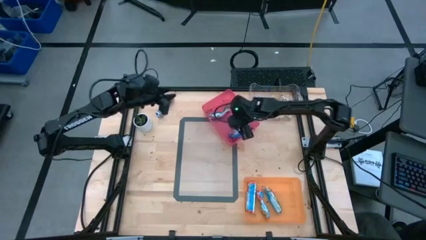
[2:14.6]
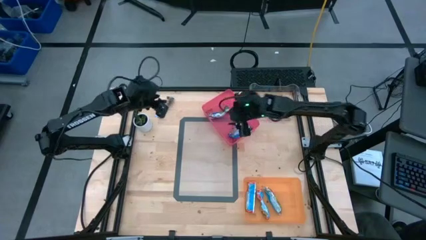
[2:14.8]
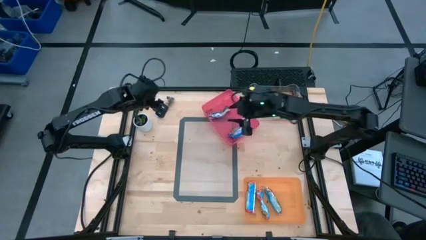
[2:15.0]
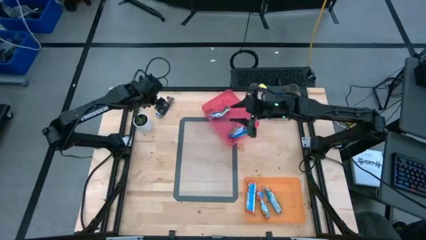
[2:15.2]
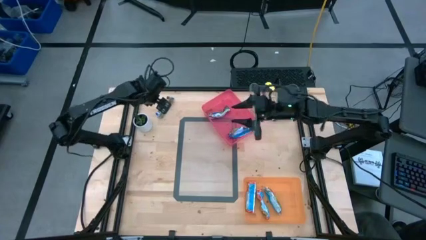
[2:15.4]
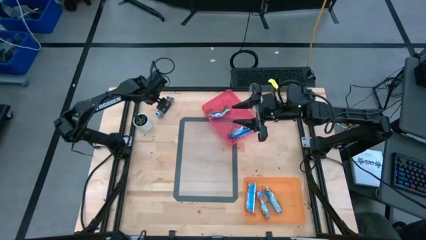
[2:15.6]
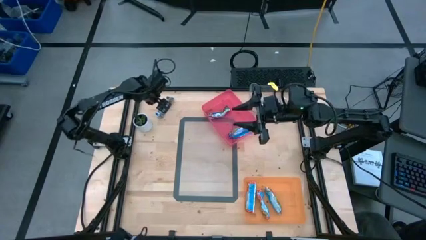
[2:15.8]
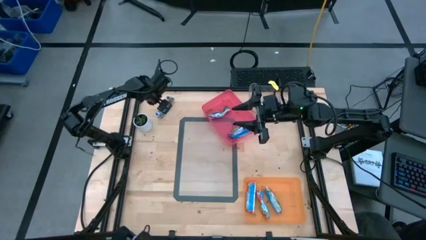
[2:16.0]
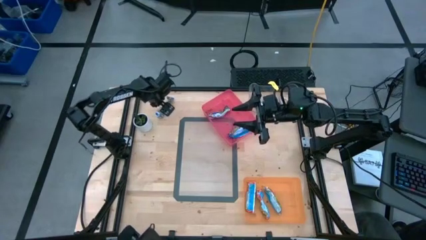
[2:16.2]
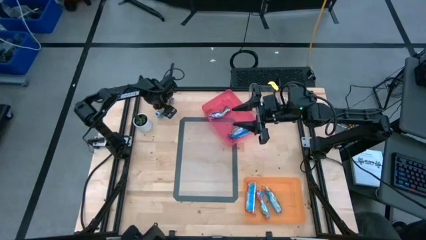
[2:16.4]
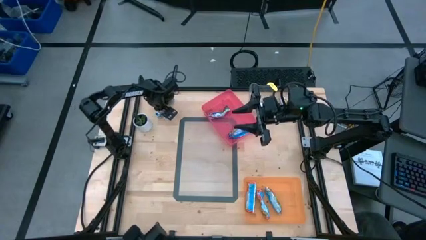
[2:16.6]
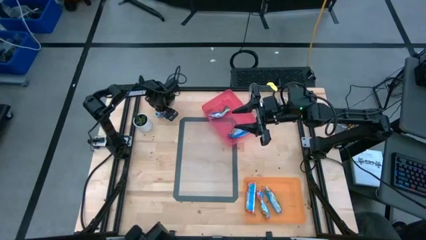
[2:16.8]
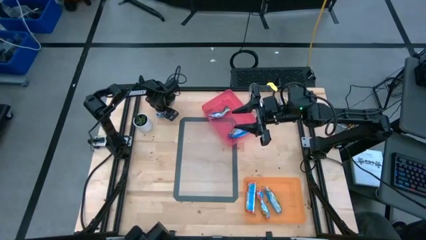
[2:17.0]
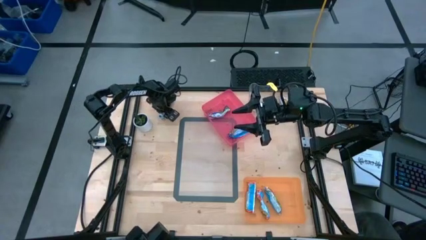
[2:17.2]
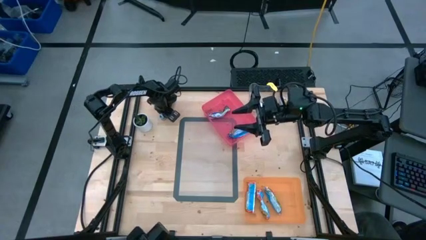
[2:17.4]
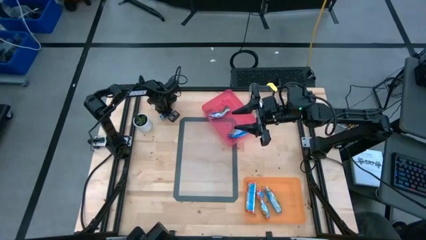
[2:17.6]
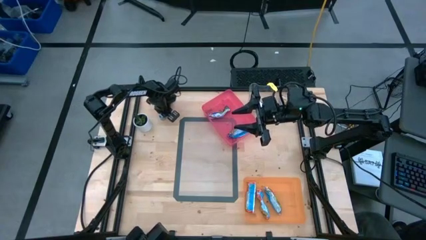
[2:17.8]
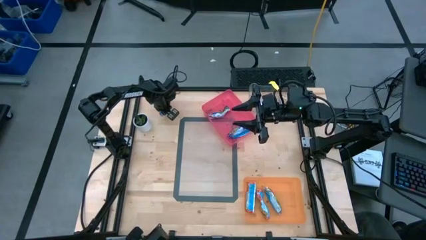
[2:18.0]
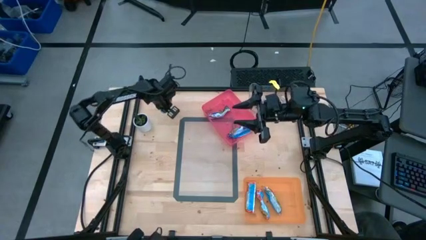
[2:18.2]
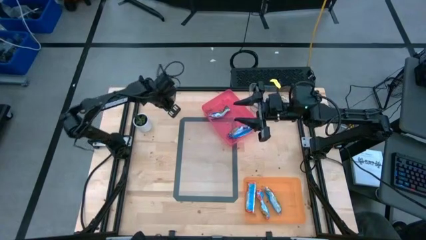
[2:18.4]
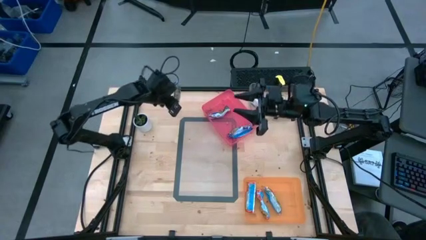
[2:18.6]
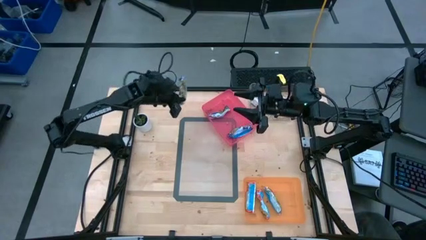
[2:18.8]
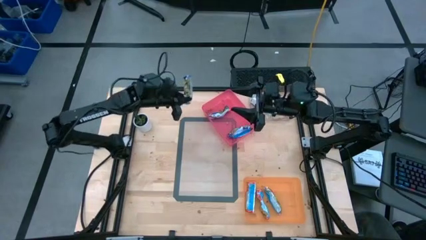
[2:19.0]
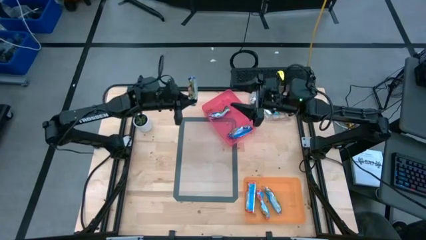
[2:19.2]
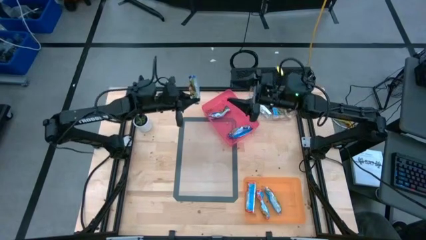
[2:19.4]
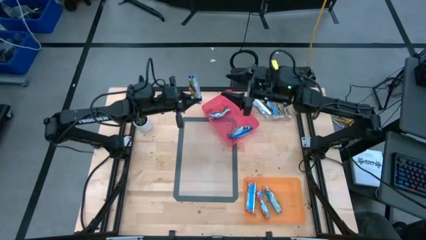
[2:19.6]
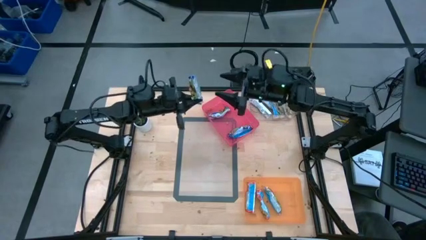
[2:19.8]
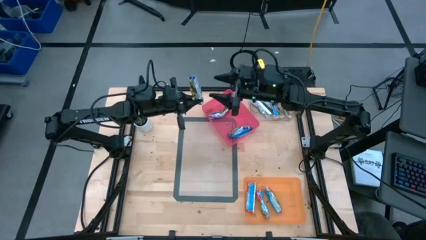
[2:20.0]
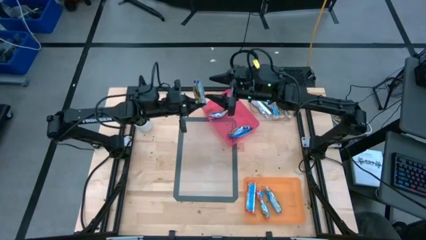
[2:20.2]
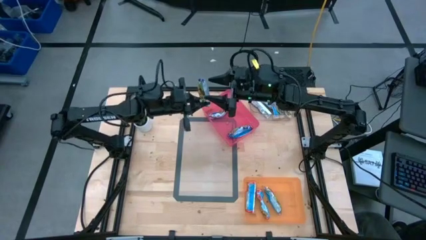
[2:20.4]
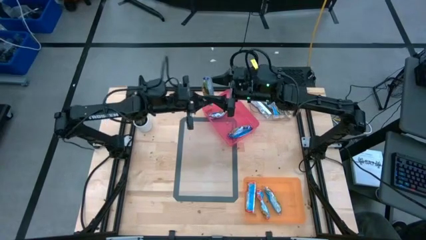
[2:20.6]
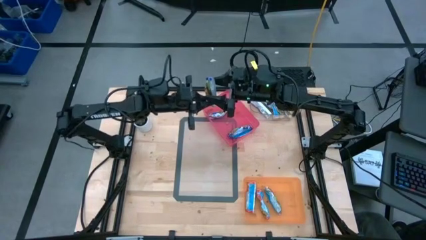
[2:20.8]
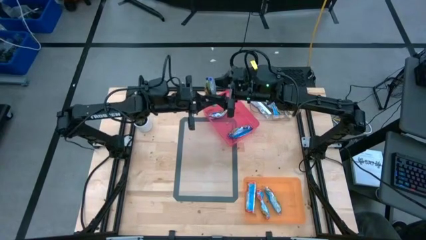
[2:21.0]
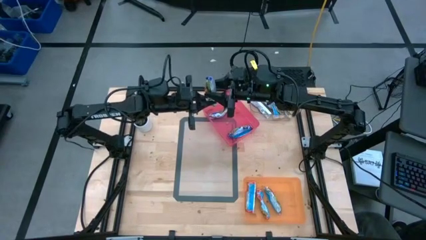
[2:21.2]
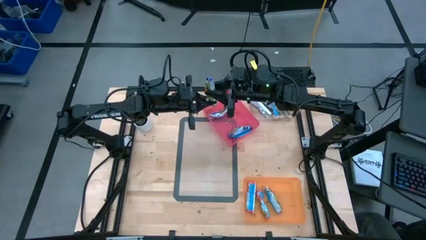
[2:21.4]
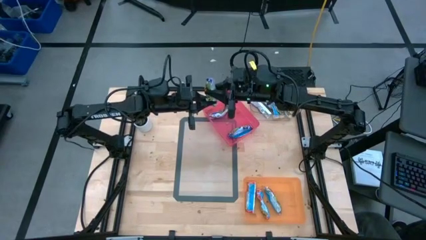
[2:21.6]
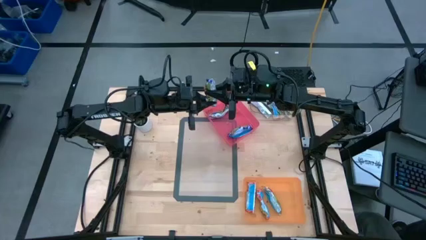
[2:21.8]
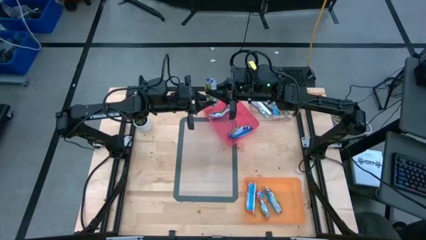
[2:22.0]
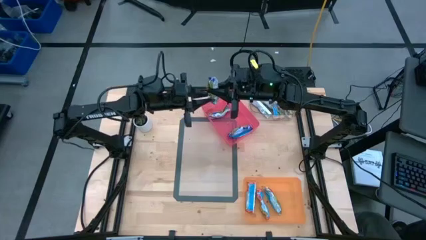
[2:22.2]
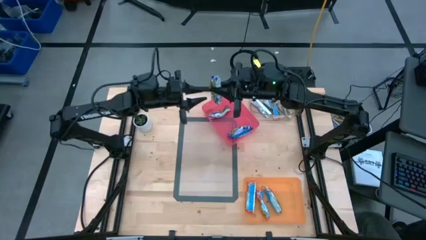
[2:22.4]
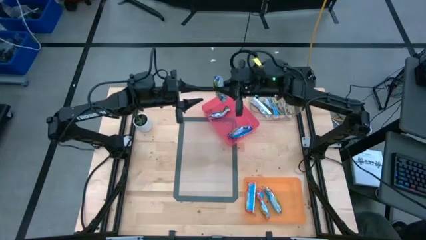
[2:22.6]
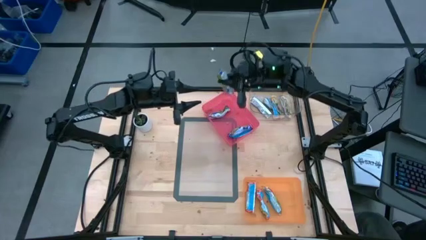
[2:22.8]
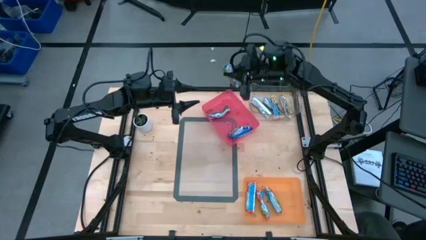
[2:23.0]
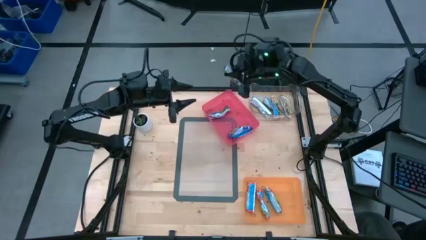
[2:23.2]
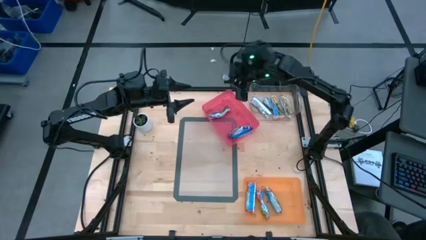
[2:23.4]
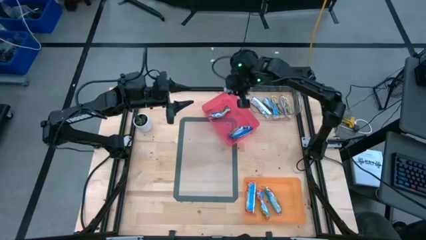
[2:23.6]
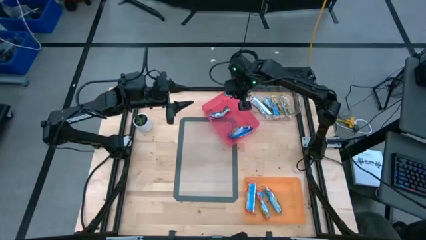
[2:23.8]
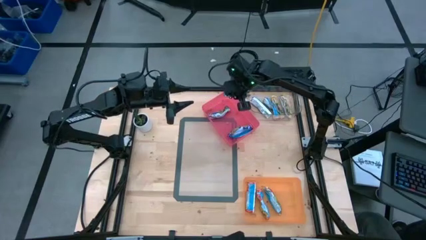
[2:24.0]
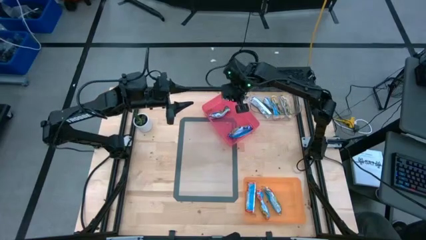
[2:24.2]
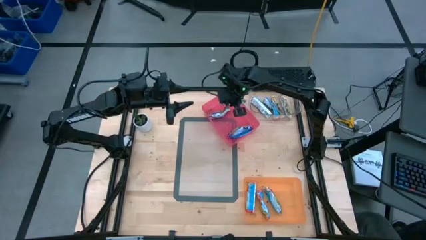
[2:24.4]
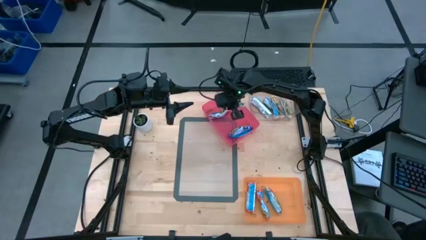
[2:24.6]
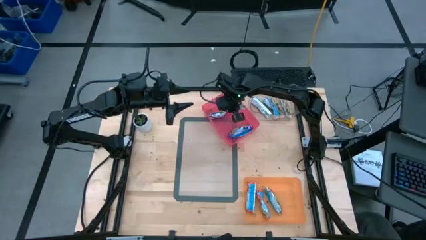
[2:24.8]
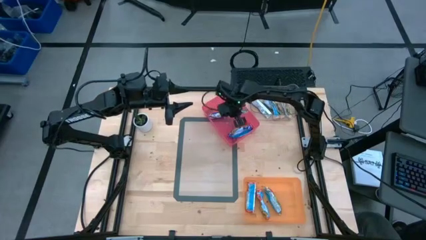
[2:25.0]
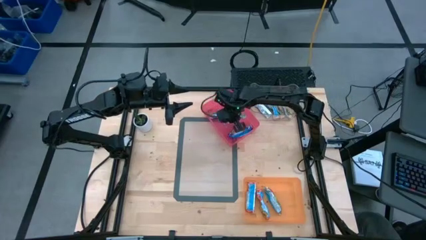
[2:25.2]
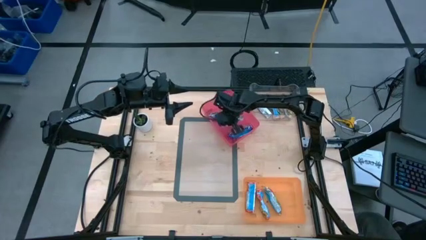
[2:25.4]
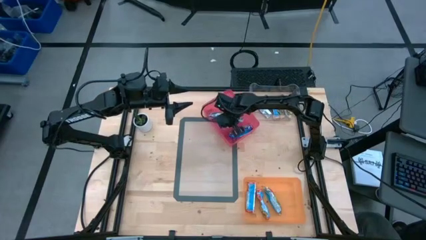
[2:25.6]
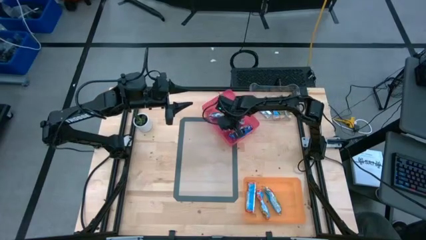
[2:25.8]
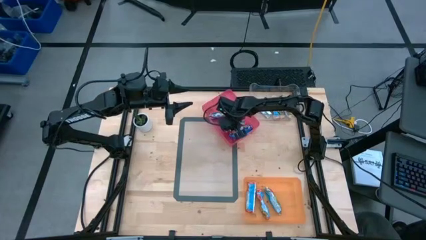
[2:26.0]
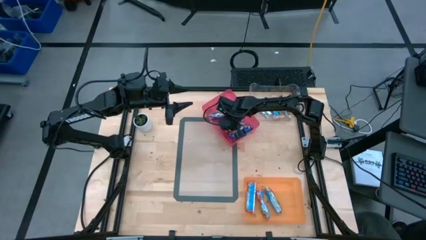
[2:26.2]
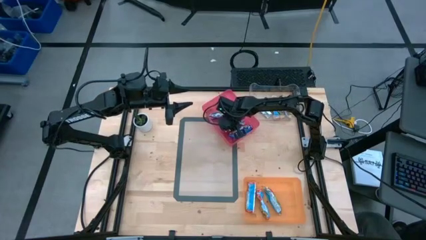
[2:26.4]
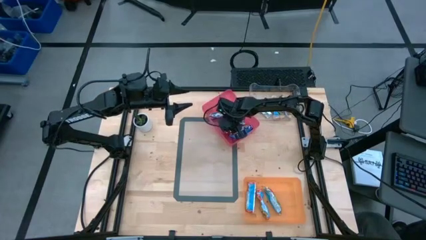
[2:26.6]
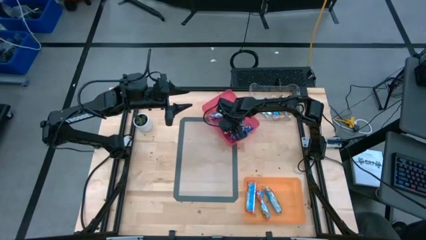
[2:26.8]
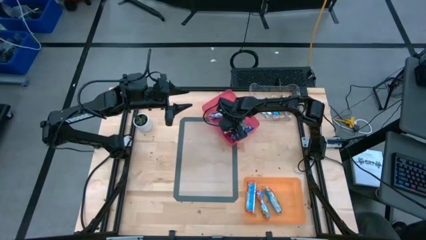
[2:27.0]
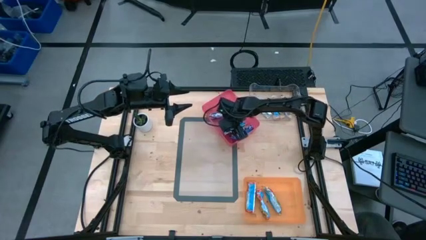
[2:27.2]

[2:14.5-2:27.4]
Task: Pick and place Granola Bars by type
Put the blue granola bar into the pink bin

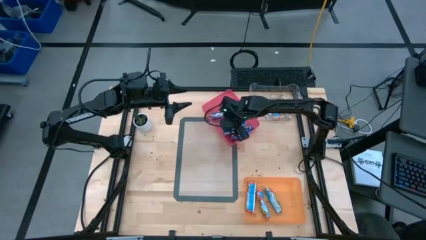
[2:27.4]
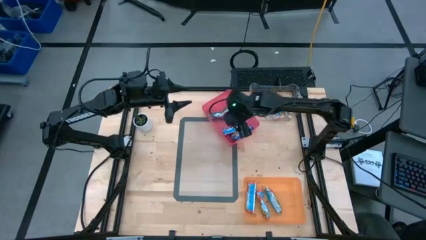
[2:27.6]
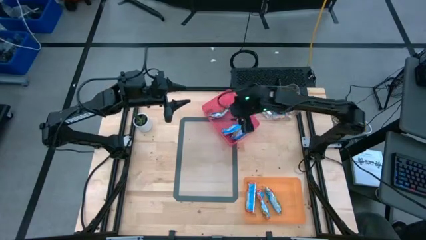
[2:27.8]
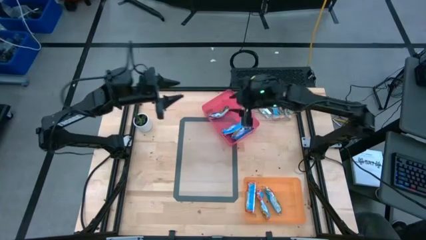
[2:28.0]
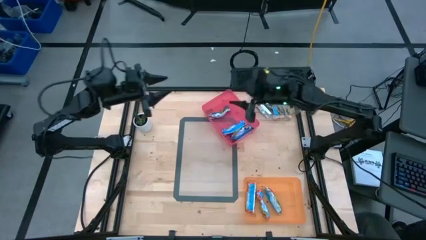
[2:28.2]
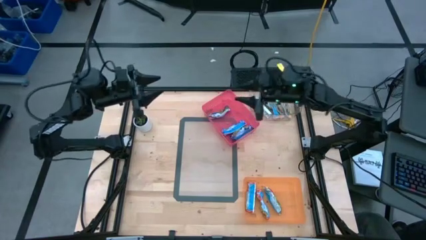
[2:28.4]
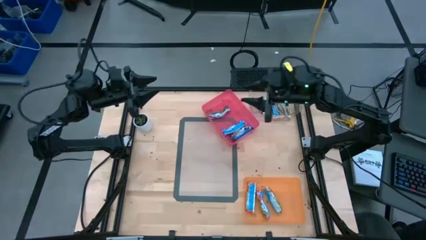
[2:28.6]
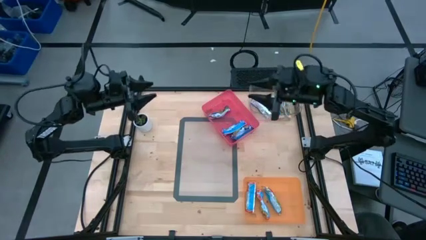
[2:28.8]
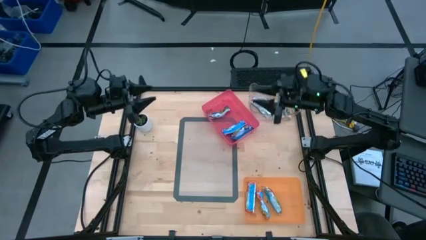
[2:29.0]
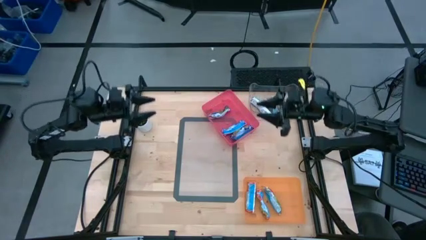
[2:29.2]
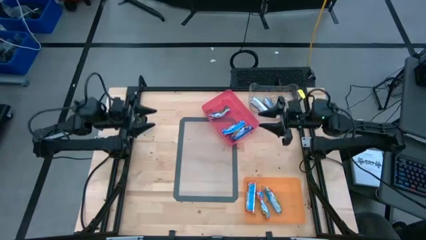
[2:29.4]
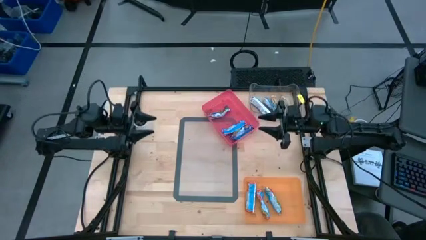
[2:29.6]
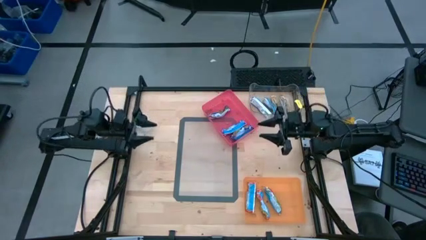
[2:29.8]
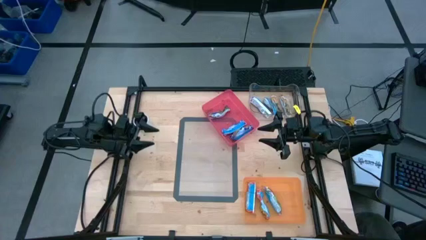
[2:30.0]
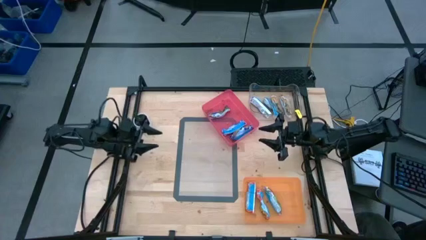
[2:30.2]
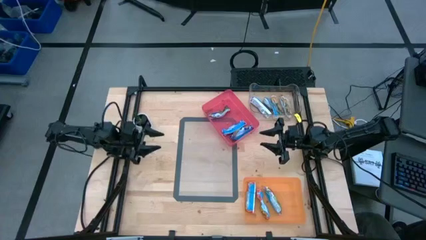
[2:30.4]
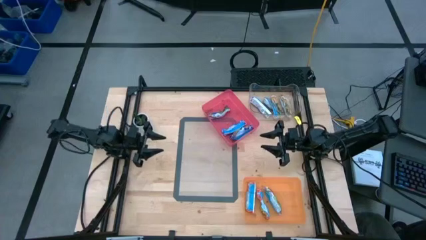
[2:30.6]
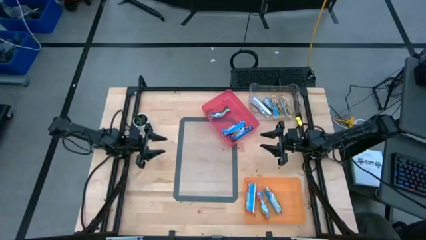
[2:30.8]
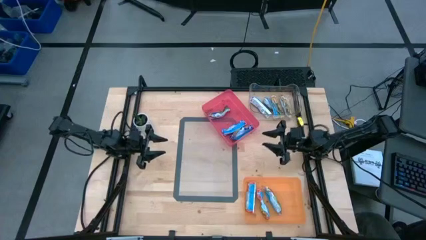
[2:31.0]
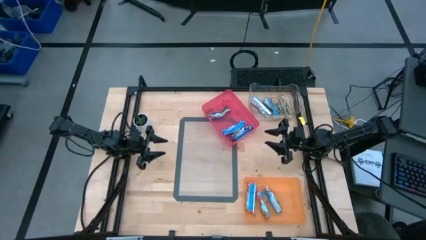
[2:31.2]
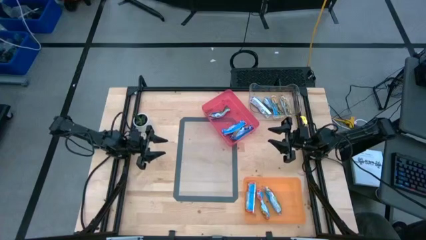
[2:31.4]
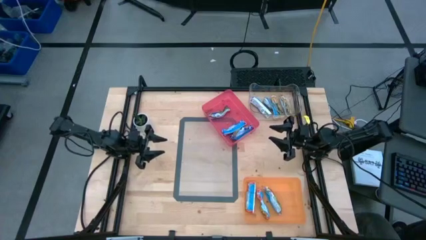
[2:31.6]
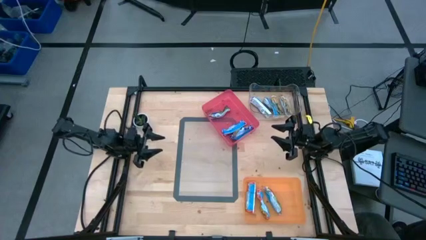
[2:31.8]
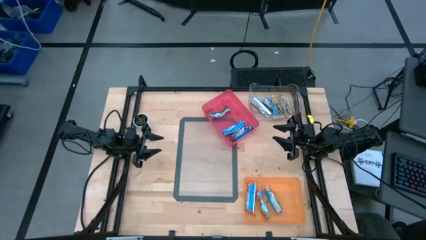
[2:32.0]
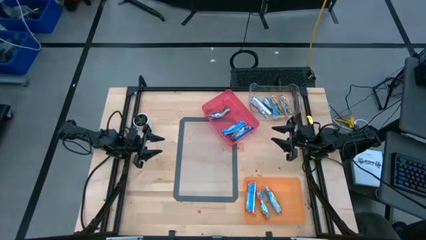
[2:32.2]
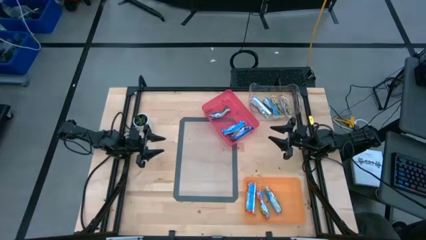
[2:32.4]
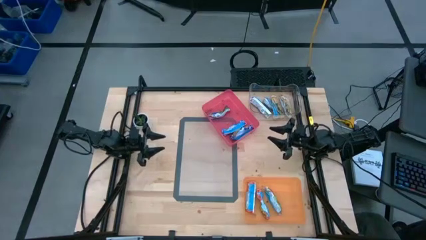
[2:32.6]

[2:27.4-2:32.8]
Return to Home Position
